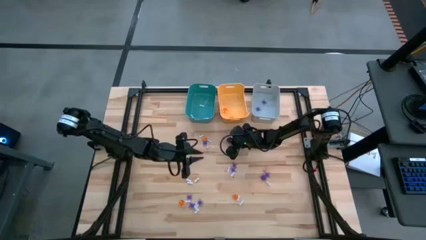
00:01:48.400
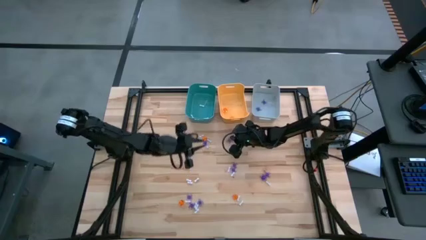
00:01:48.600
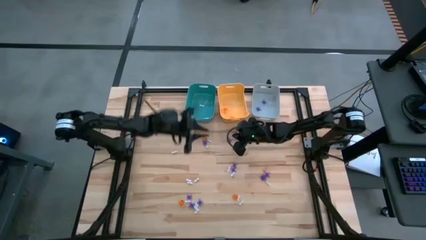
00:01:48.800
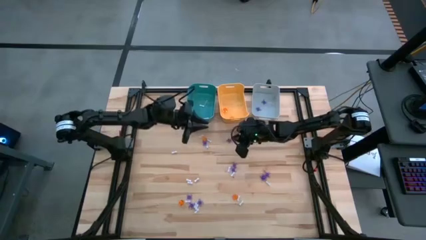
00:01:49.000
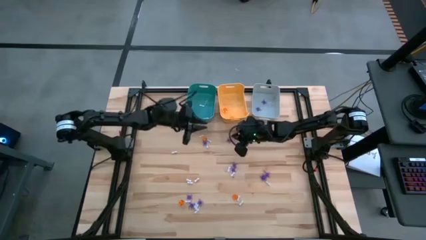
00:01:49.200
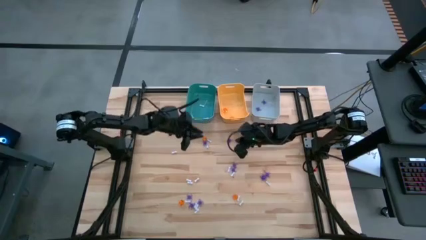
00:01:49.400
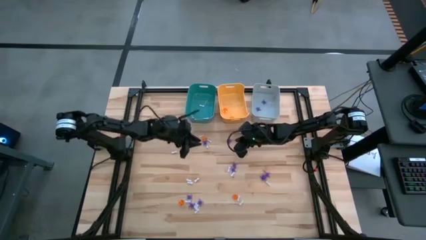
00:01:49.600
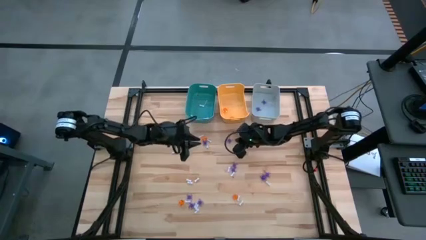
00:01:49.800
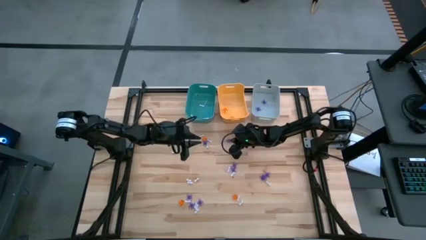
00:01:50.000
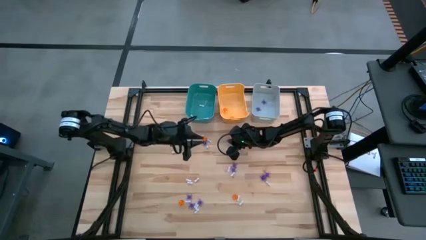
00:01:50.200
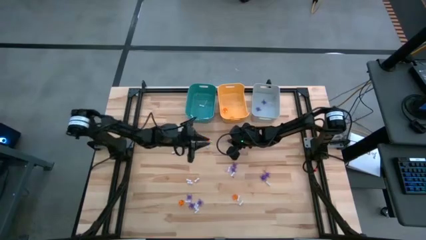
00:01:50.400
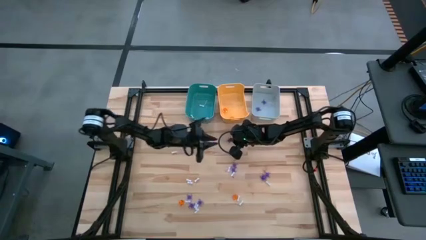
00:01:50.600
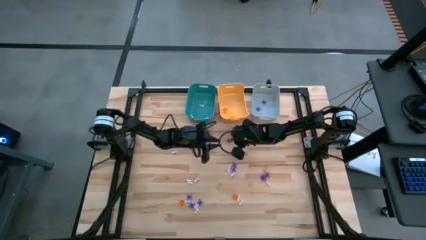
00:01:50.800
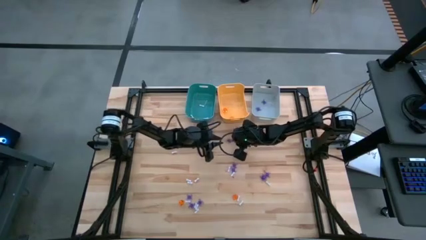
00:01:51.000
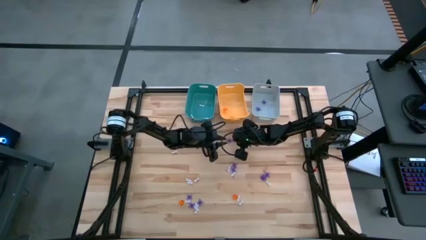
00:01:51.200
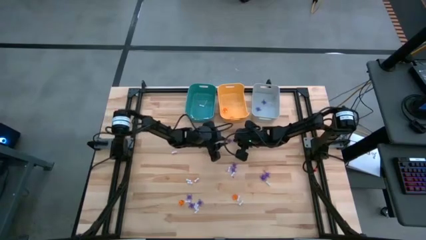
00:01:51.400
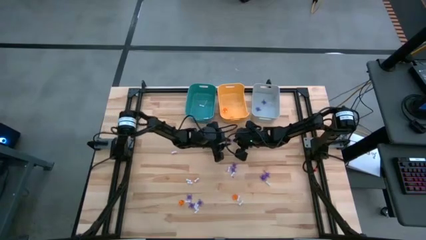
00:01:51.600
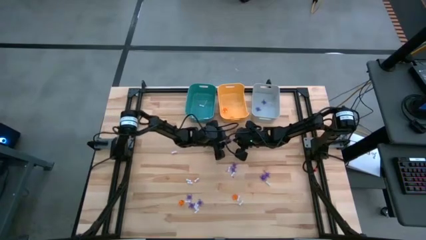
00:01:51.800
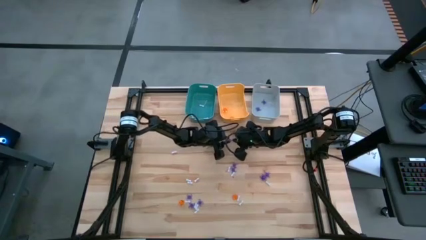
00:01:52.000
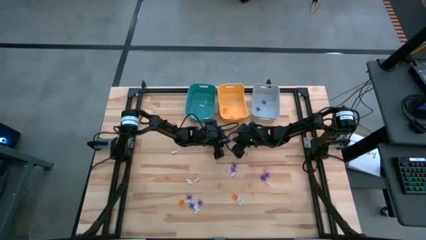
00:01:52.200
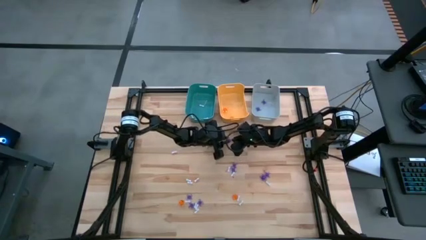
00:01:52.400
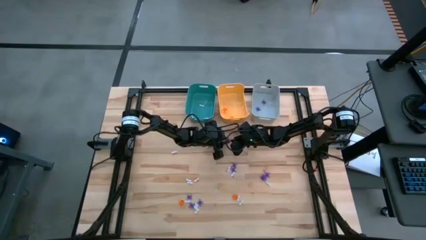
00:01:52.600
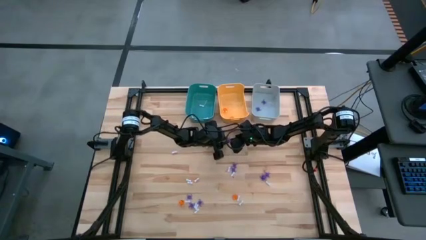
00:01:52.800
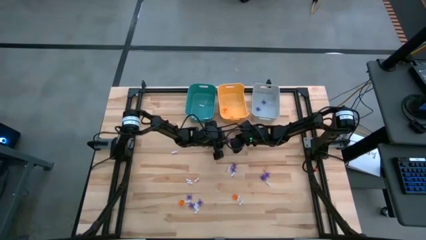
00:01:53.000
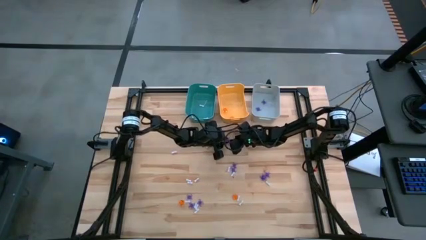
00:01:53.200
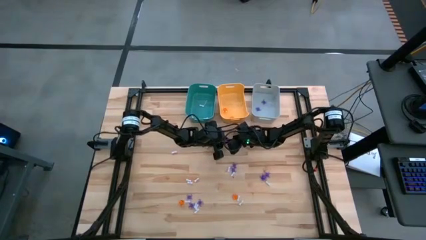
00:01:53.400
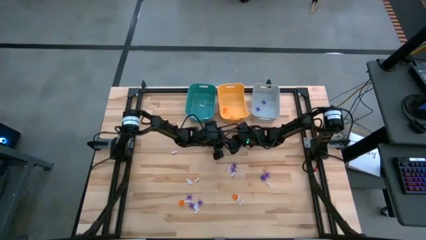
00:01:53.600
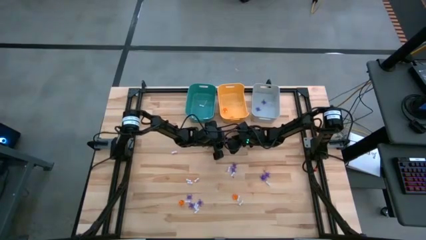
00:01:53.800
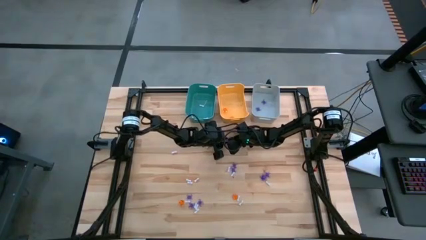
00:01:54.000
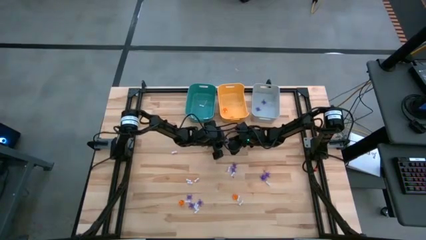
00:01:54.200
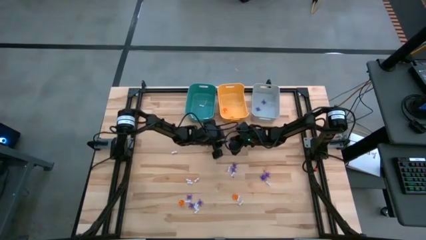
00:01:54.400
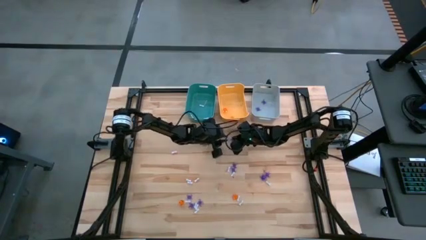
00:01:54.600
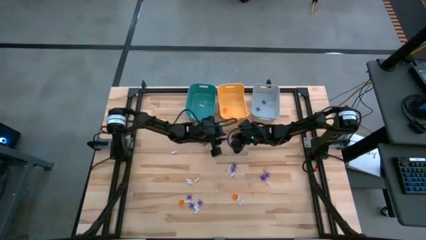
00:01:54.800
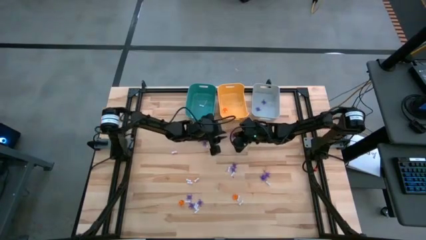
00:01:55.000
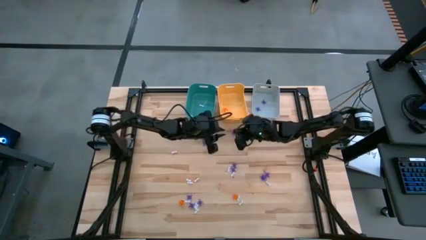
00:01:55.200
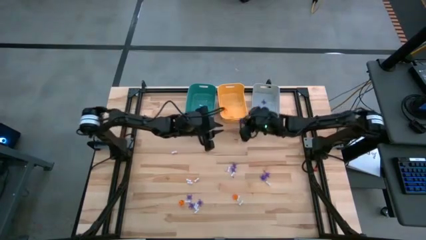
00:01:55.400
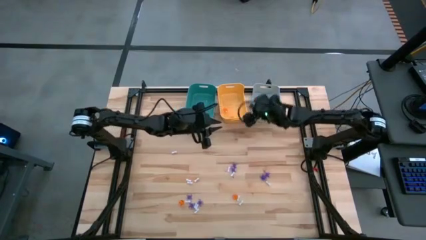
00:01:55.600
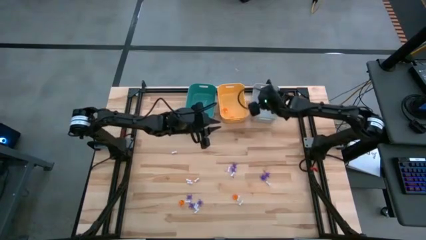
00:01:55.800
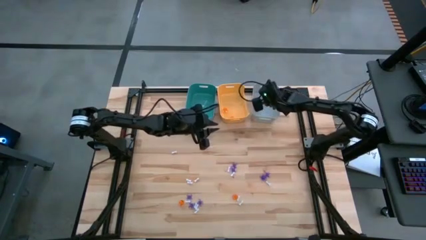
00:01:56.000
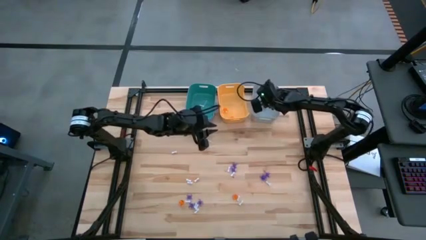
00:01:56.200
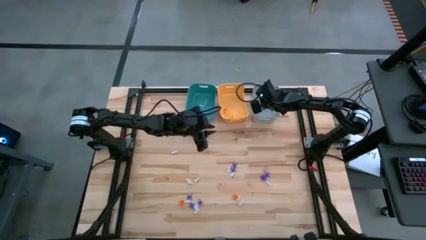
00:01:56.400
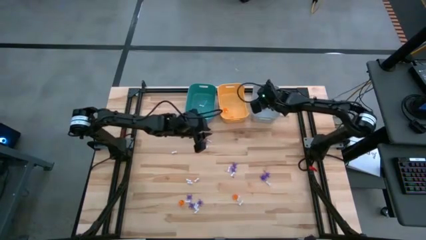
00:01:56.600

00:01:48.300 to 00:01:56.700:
Task: Sort Halloween decoration
Put the purple spider toy into the gray bin

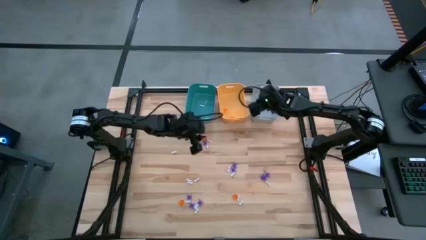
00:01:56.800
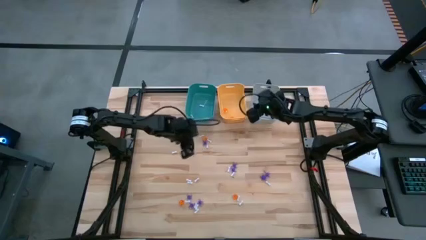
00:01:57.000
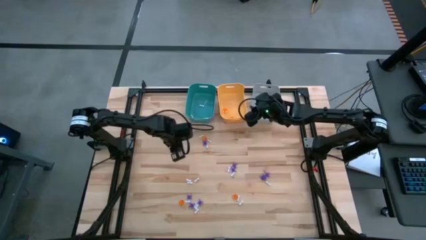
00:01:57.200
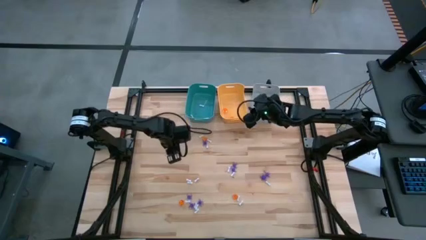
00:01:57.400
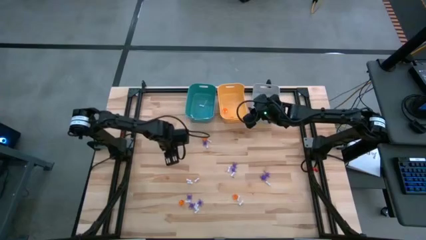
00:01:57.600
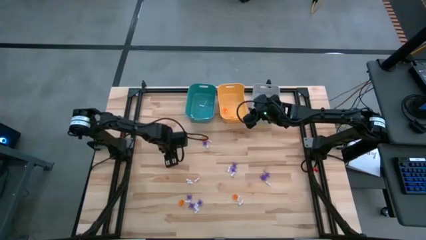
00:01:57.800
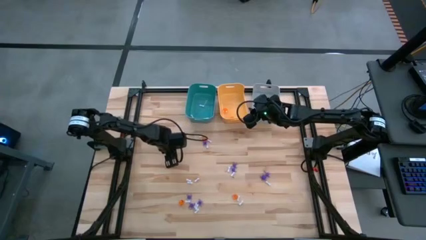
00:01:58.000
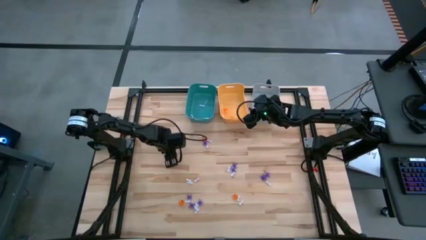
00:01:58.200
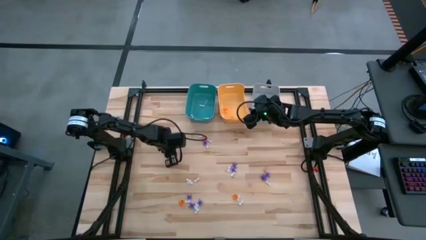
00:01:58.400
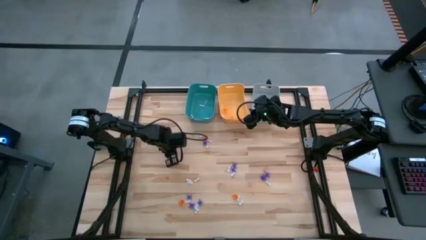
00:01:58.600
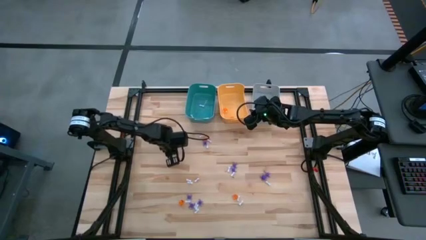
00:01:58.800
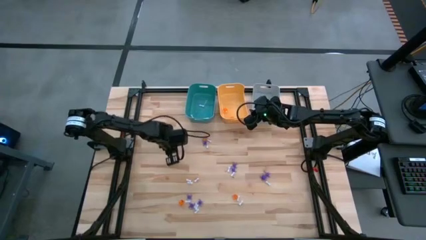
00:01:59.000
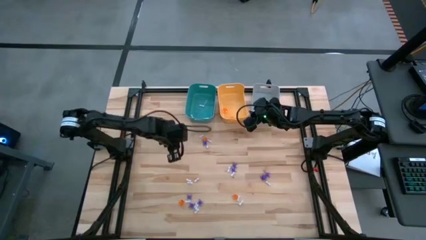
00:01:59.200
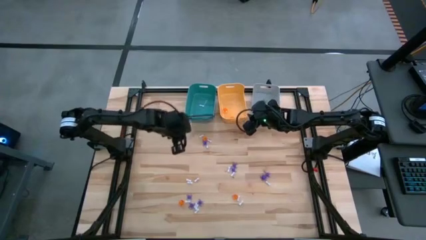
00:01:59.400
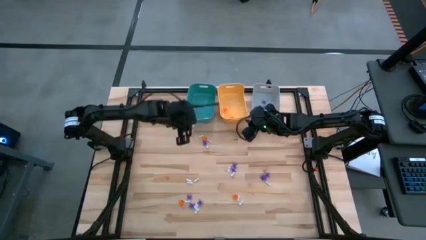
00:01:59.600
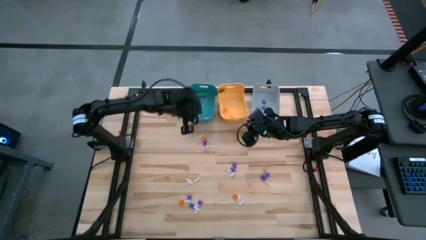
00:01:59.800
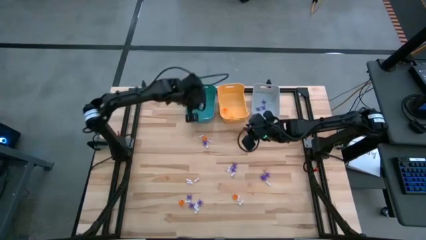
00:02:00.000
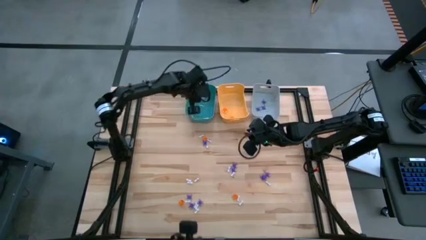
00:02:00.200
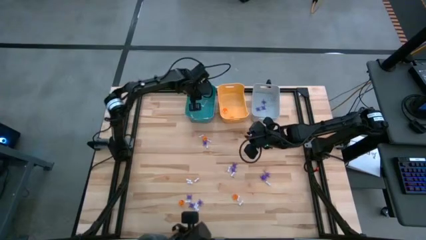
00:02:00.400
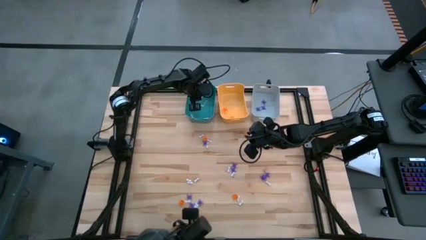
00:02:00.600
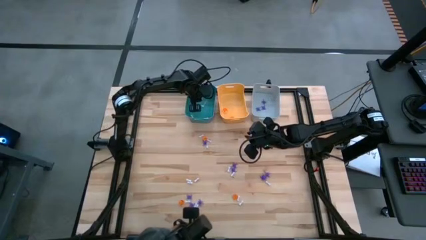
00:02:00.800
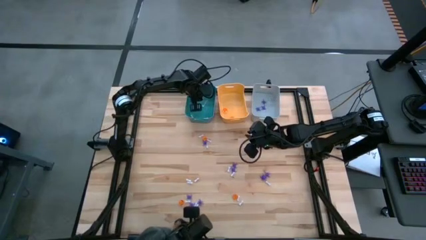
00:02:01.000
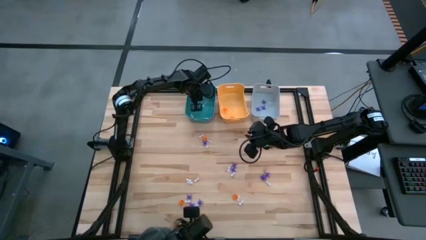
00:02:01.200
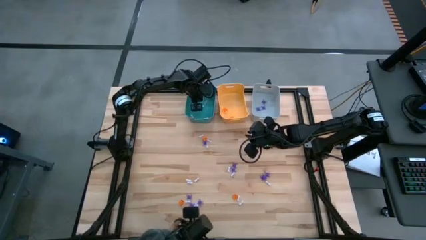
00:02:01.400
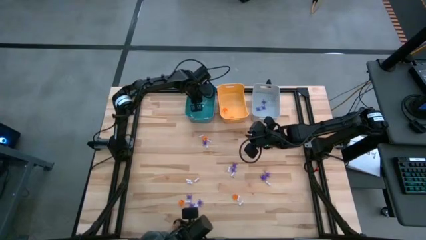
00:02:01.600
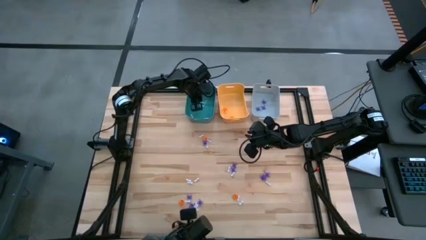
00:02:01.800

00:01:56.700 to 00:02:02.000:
Put the white bone toy into the blue bin
